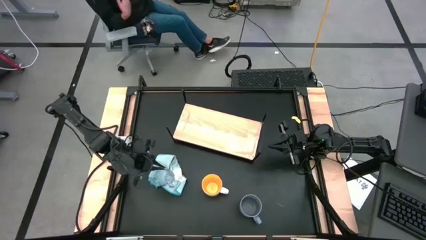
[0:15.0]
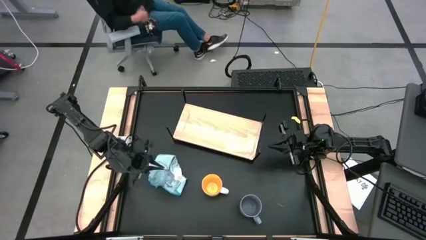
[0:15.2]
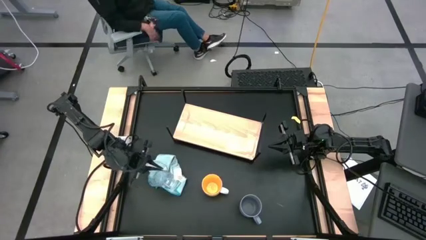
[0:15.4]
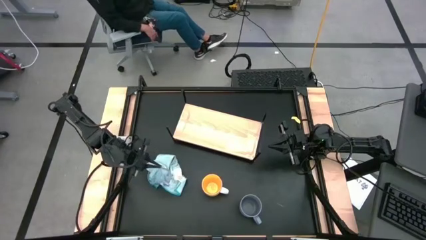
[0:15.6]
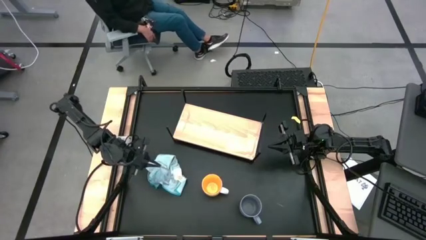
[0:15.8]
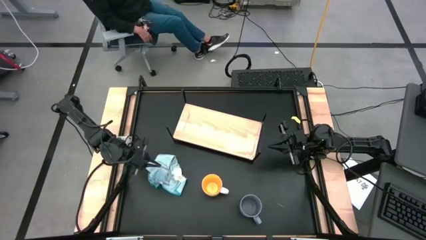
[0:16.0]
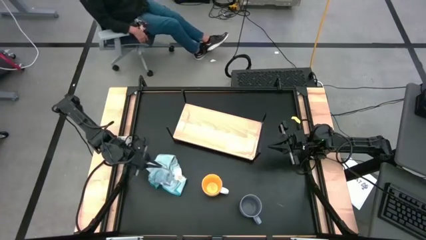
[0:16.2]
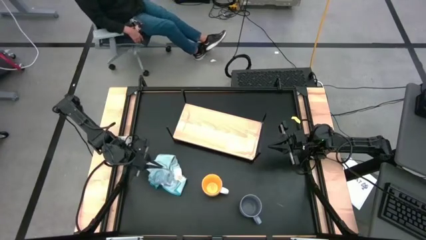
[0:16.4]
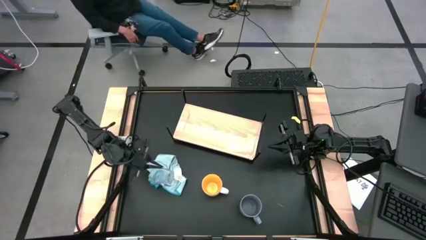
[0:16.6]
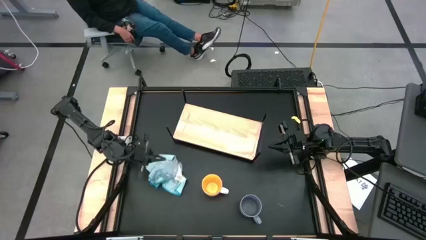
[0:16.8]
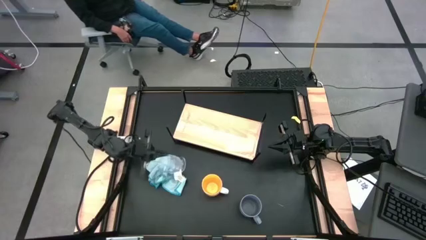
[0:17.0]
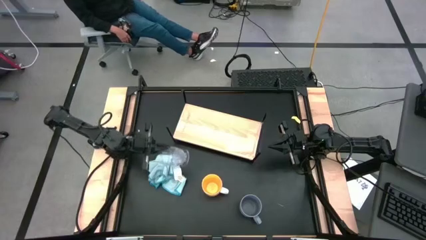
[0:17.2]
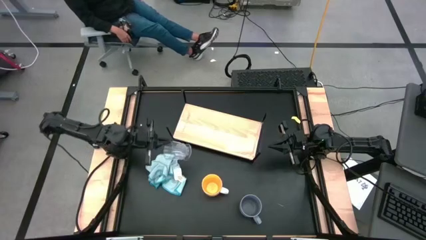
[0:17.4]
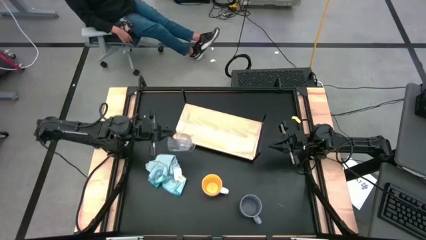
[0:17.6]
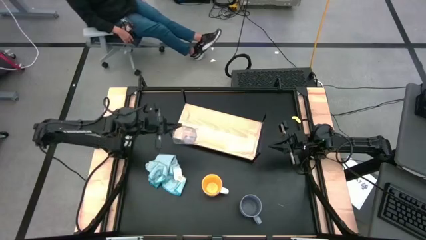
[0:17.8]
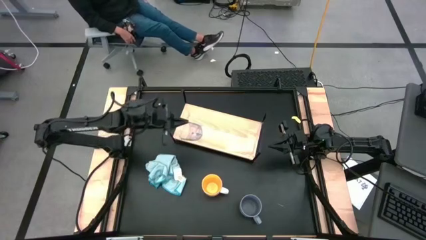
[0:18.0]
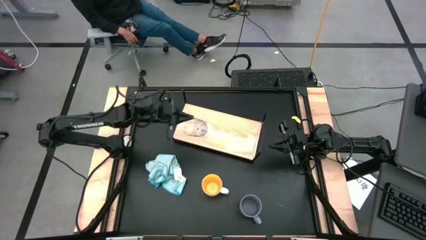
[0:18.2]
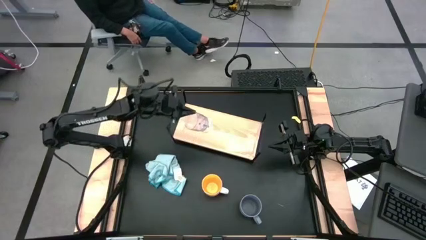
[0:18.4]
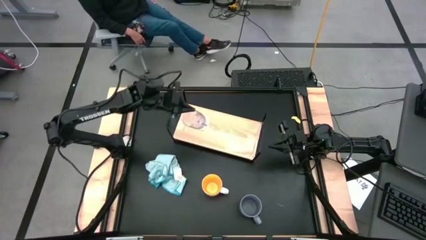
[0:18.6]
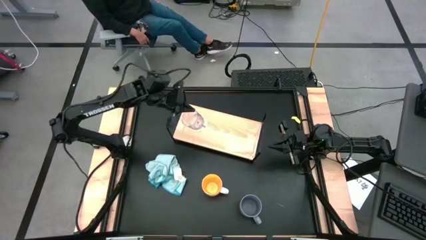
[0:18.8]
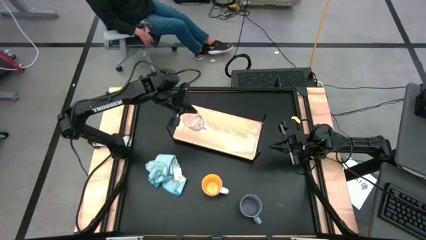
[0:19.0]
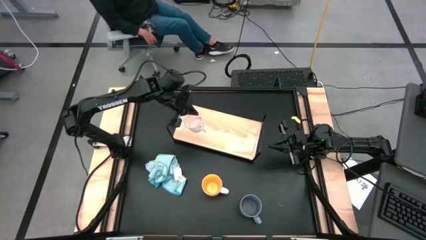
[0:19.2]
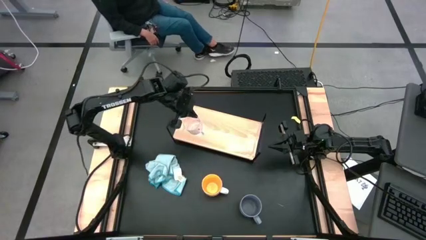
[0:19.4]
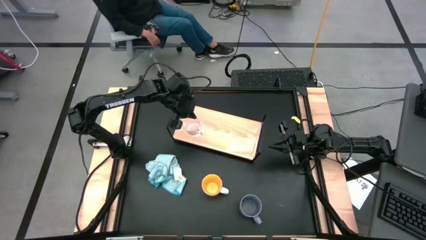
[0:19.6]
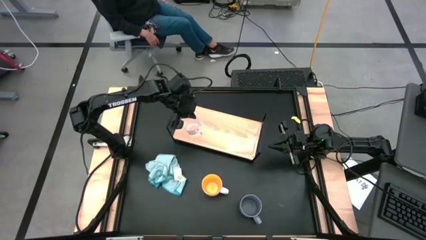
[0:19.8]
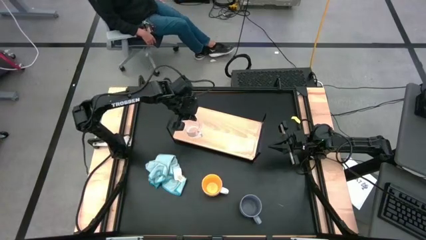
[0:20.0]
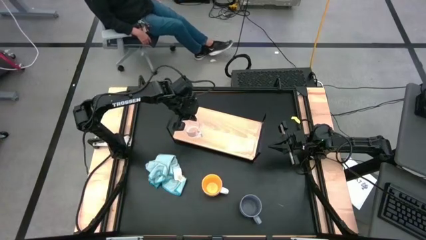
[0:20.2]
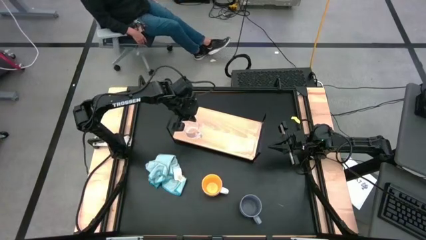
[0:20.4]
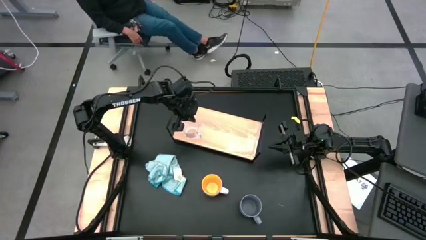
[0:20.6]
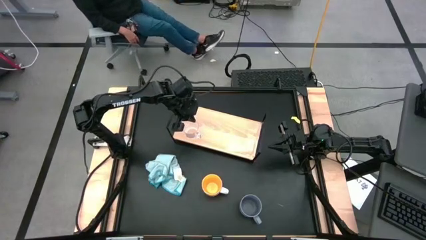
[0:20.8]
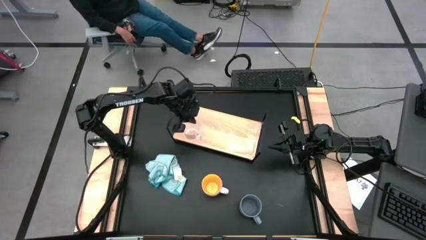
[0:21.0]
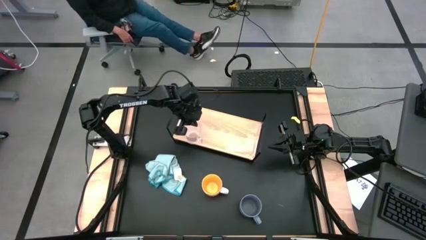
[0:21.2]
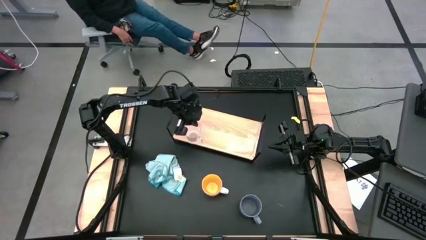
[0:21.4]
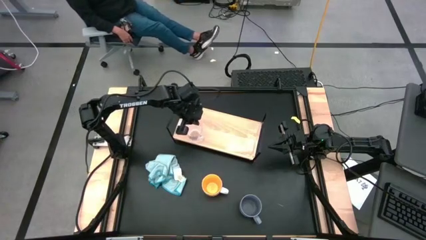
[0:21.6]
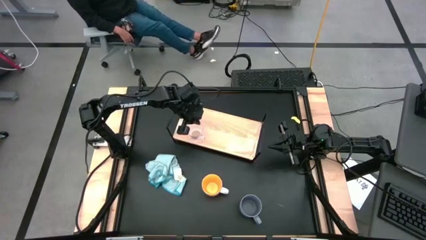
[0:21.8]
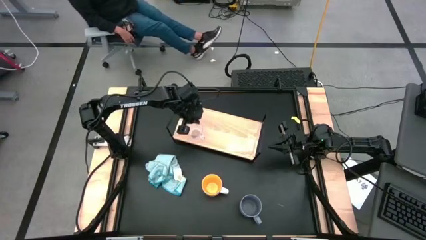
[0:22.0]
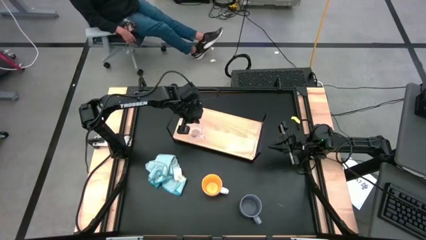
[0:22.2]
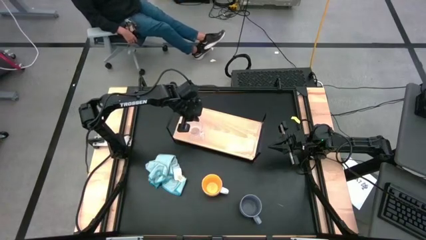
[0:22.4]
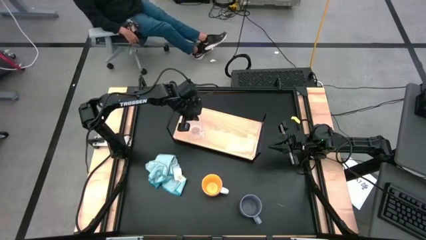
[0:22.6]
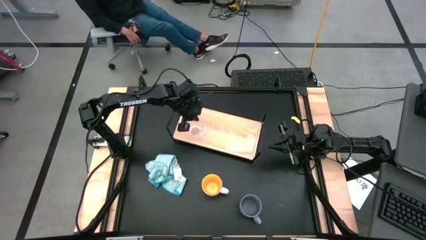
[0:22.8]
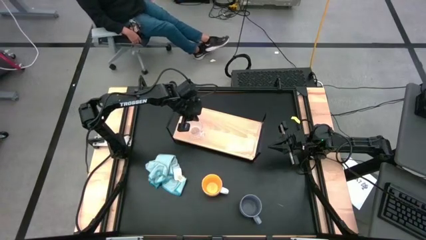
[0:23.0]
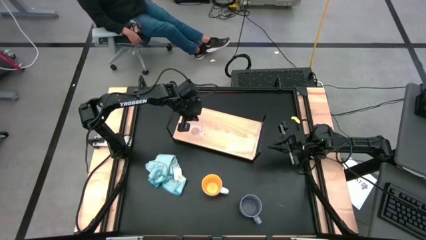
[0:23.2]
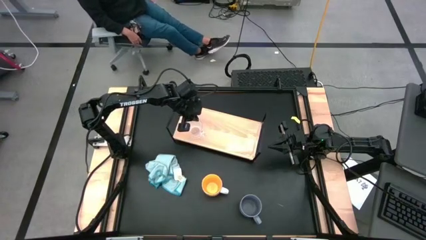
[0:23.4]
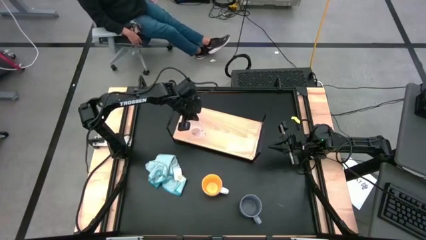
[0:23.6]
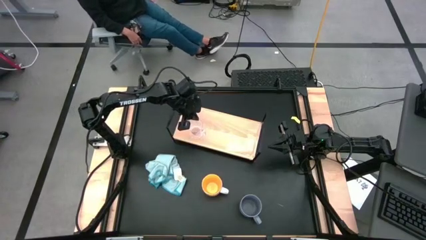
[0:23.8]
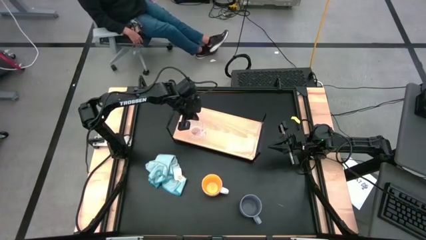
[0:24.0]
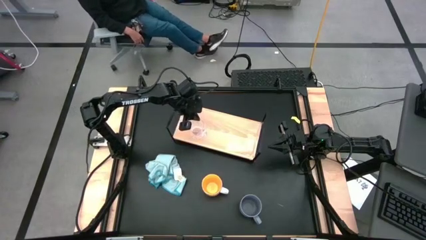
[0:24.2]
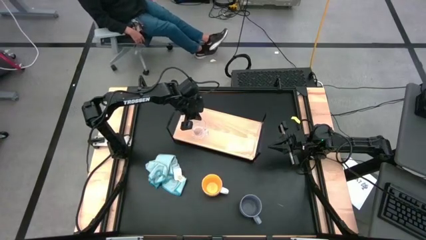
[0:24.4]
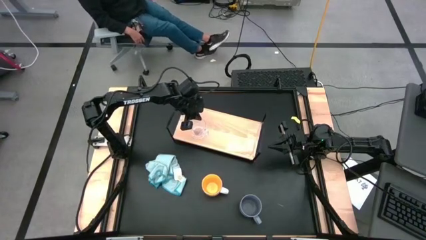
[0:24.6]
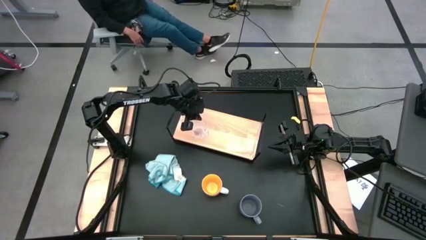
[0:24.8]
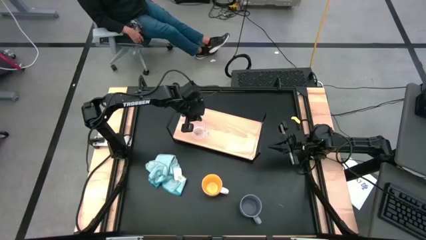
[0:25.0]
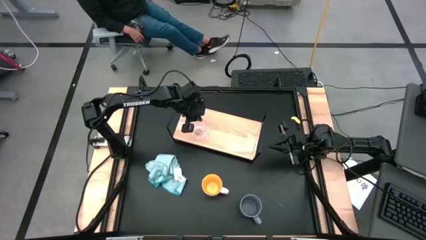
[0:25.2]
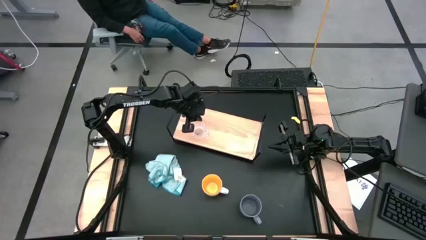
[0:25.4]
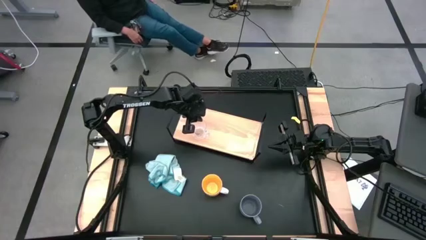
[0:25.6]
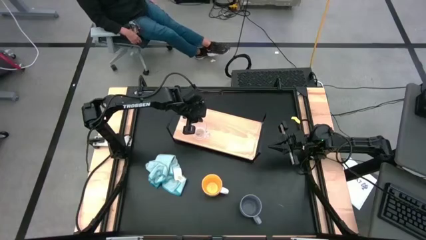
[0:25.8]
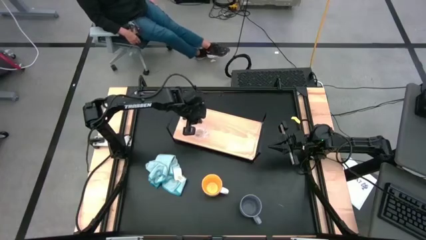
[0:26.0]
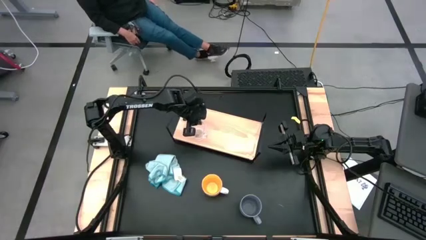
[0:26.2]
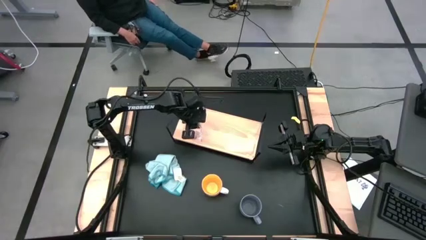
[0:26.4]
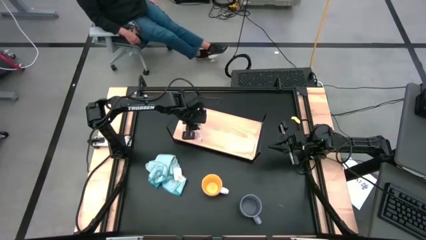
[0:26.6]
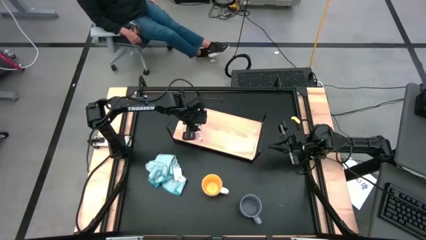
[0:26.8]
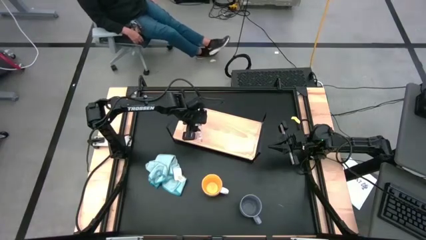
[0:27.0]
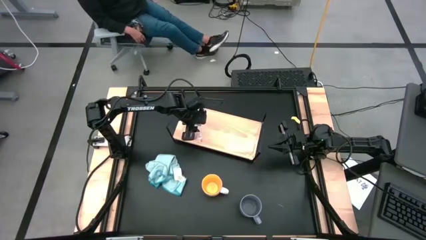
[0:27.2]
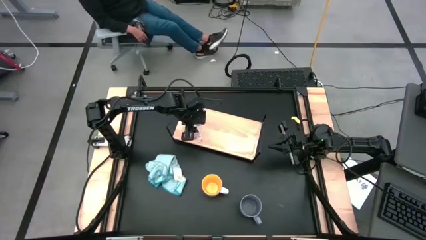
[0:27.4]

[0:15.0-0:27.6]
Task: Stack small to large cups/mugs on shelf
Put the transparent mug on the shelf
